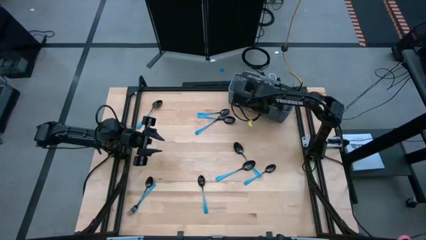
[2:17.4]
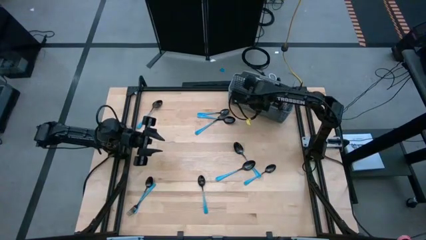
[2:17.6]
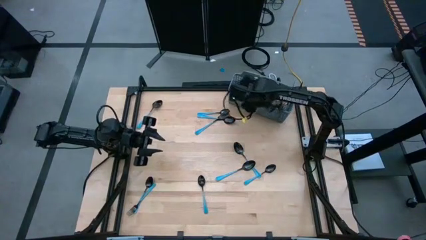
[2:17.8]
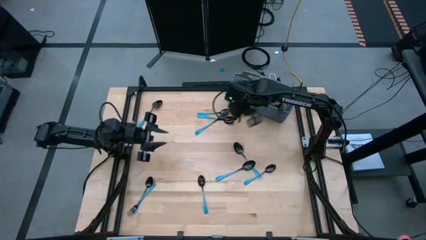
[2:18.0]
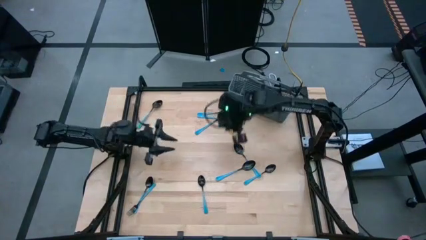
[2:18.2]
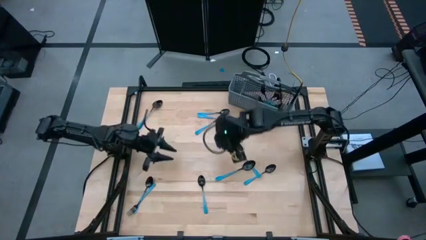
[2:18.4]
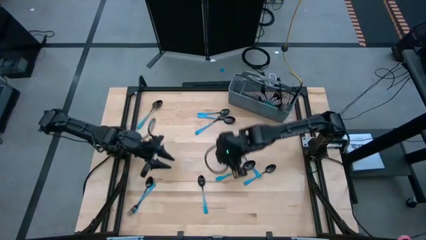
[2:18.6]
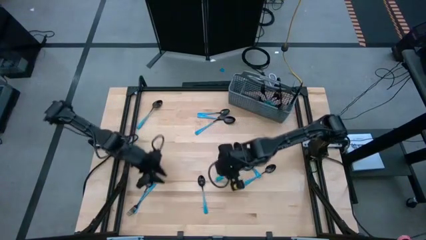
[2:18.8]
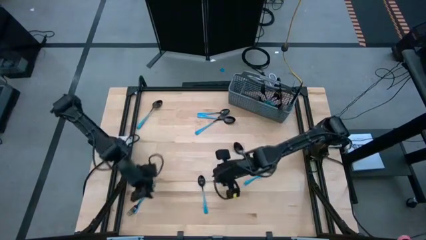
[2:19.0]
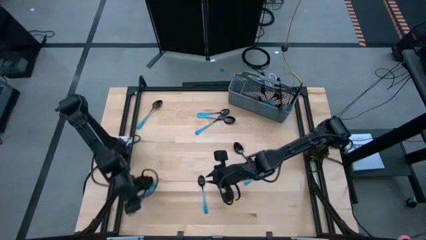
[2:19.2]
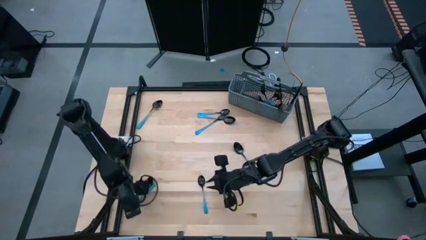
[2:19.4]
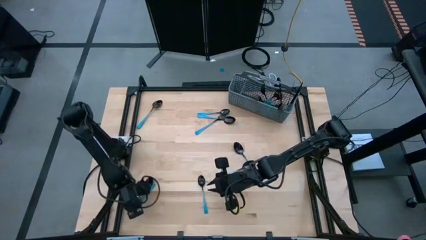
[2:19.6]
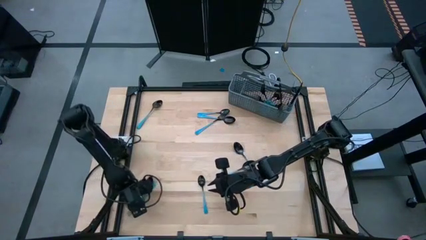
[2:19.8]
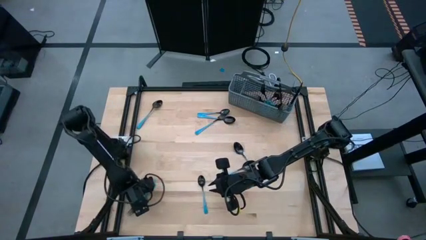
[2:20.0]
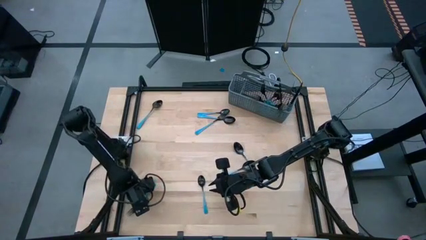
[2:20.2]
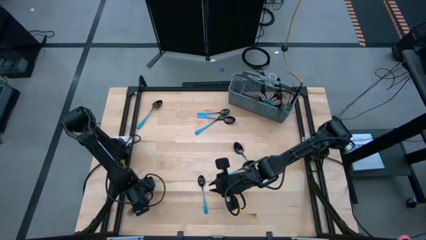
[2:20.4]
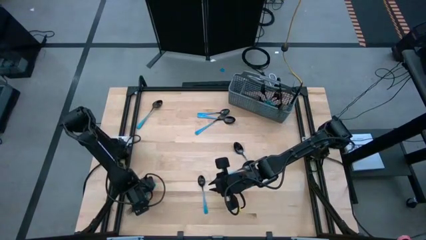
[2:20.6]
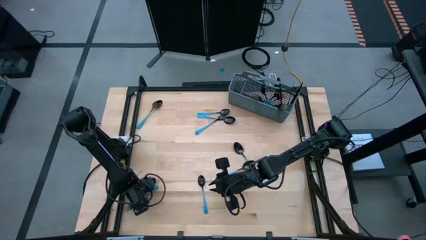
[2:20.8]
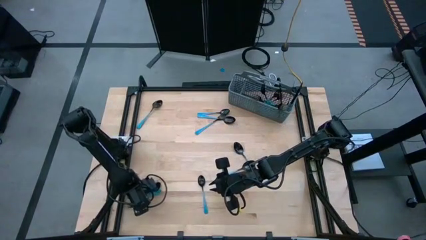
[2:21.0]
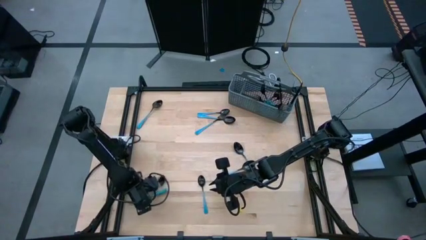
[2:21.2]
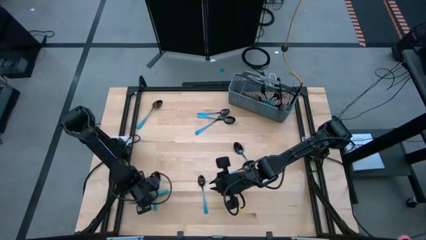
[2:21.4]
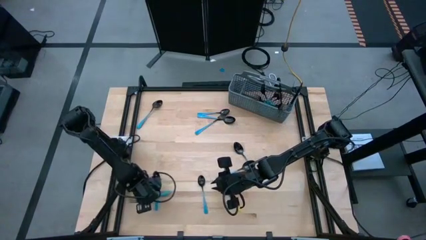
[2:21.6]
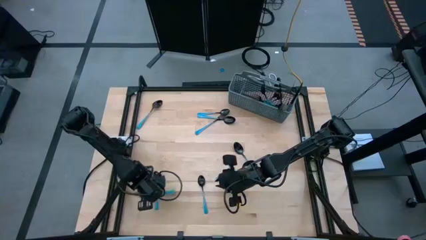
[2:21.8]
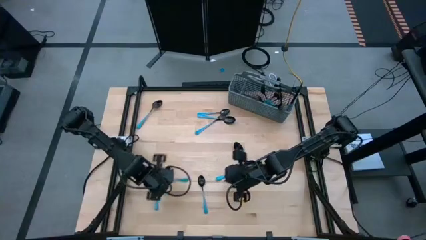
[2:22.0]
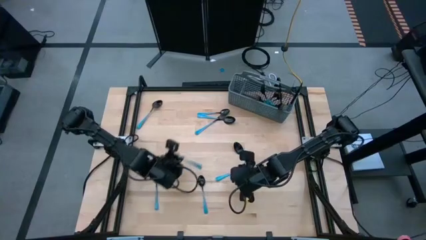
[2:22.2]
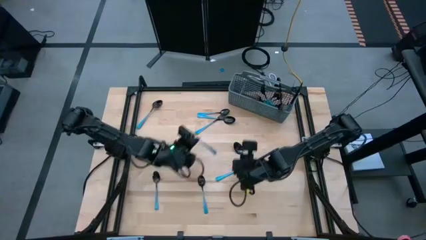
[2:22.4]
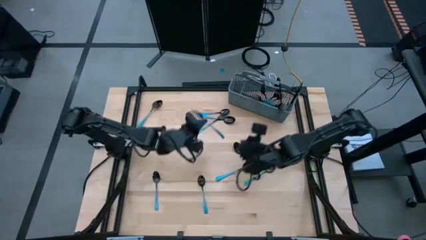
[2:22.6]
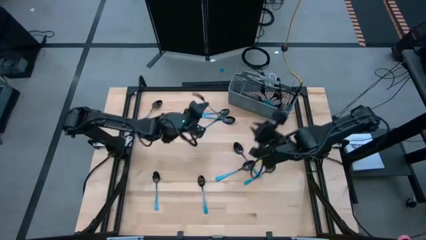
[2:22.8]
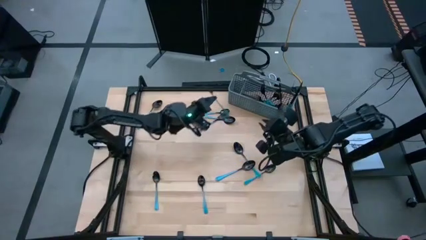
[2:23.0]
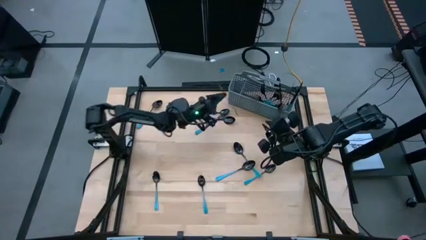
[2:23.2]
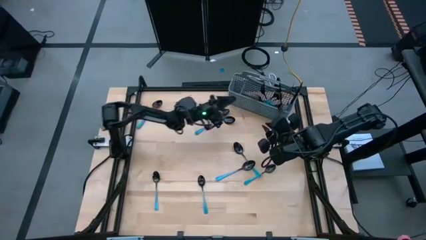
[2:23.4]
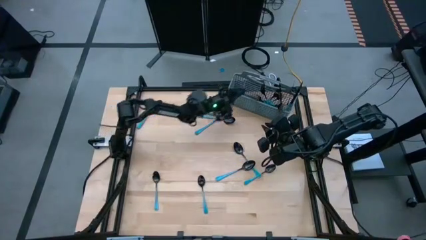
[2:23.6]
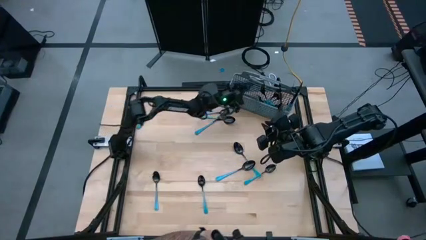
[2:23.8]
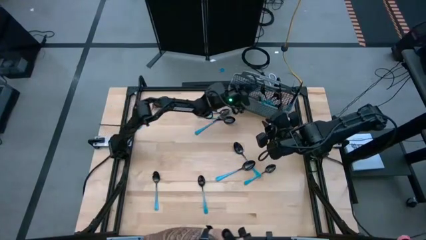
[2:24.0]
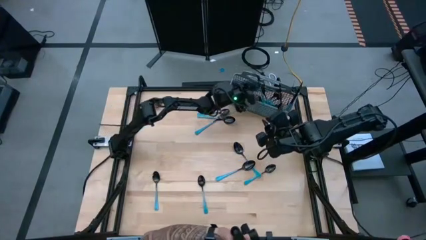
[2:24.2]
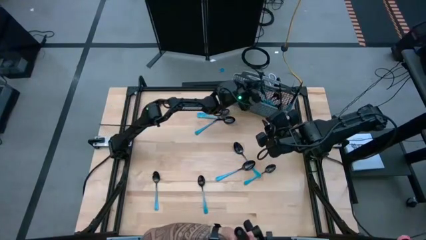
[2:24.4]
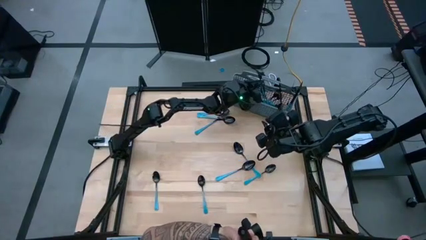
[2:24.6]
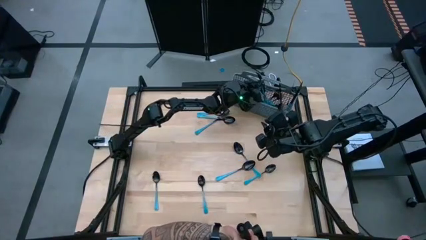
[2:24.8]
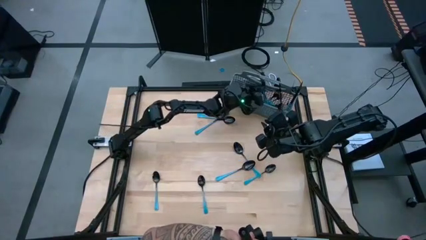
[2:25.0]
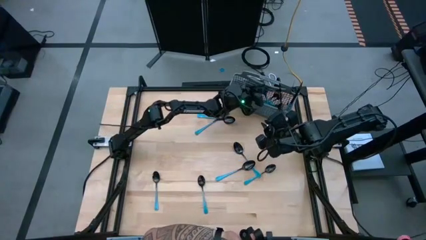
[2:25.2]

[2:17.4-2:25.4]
Task: Sort silverware
Put the blue fork into the middle of the blue utensil organizer

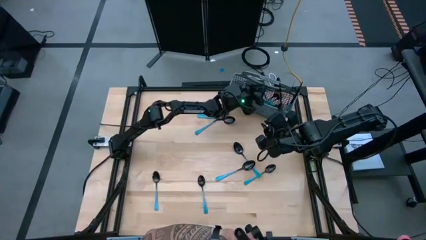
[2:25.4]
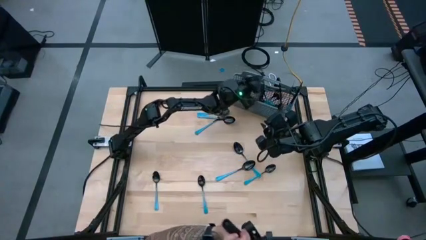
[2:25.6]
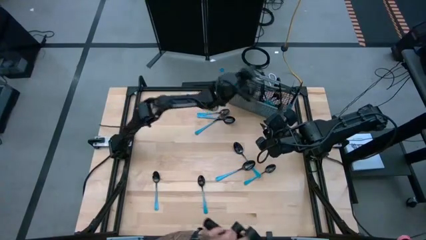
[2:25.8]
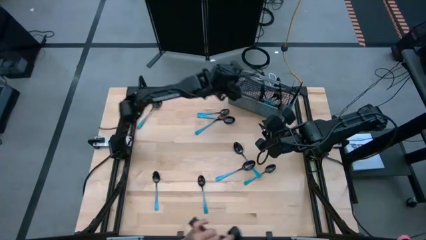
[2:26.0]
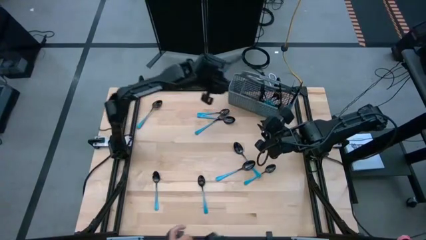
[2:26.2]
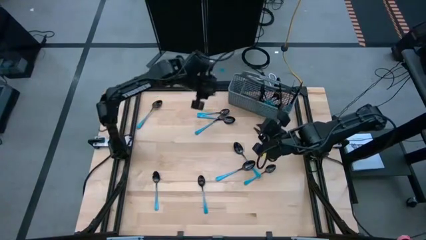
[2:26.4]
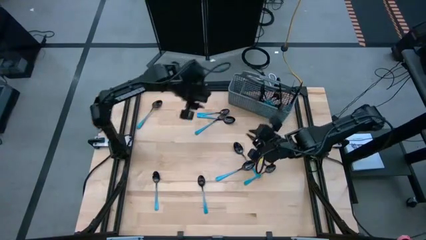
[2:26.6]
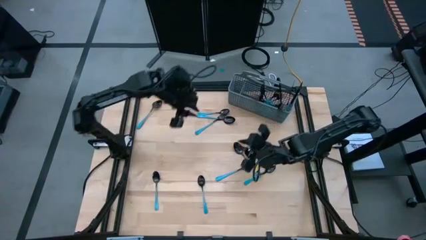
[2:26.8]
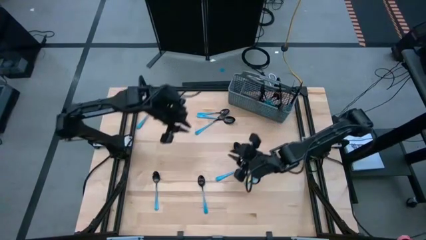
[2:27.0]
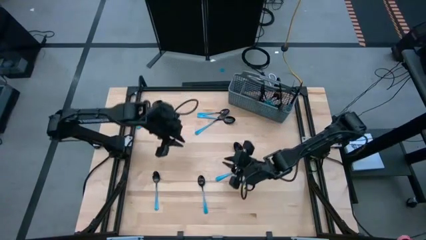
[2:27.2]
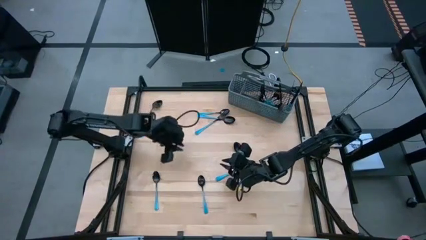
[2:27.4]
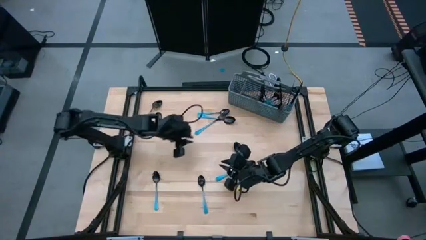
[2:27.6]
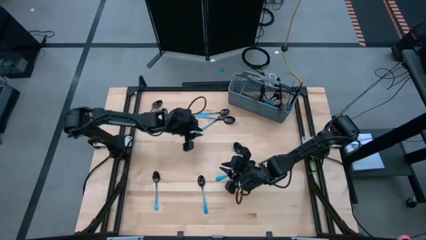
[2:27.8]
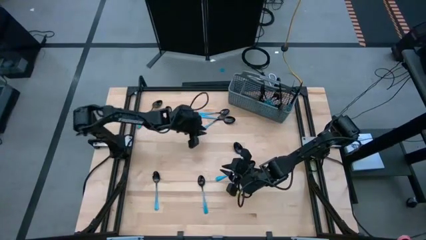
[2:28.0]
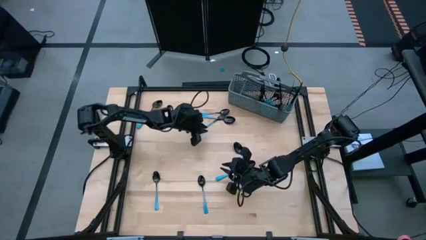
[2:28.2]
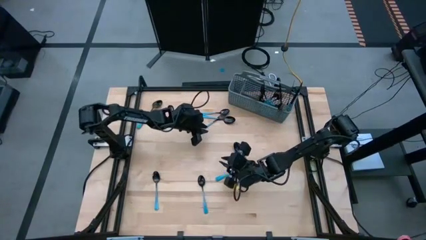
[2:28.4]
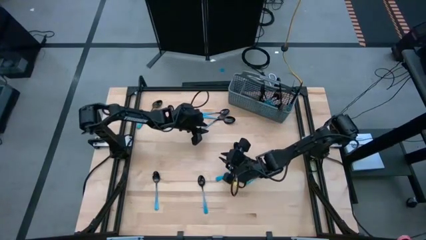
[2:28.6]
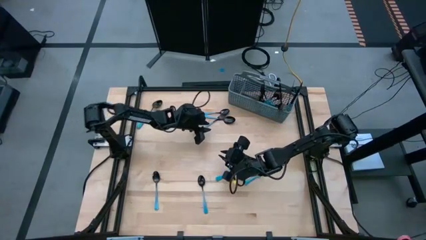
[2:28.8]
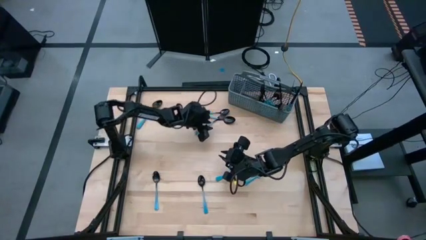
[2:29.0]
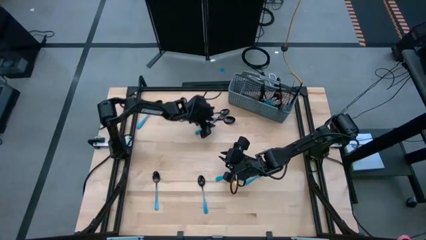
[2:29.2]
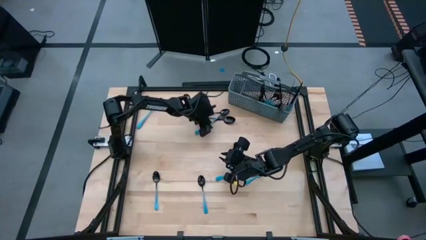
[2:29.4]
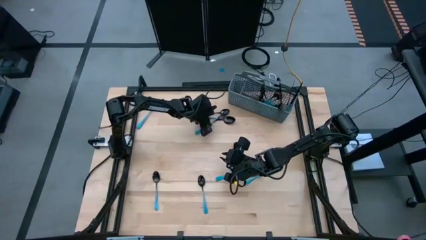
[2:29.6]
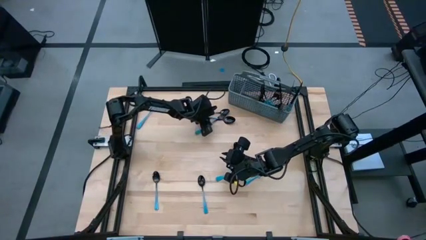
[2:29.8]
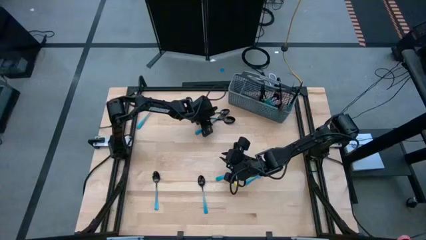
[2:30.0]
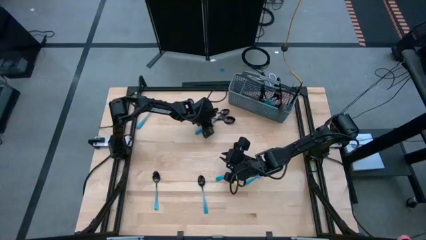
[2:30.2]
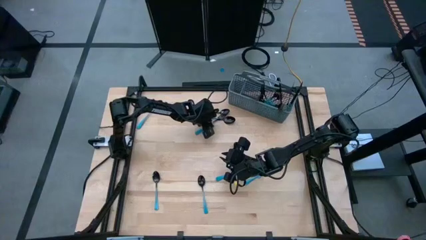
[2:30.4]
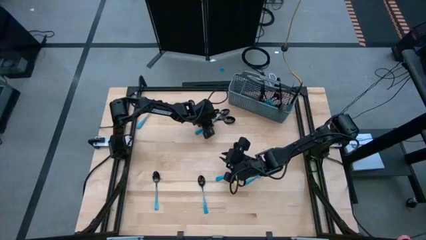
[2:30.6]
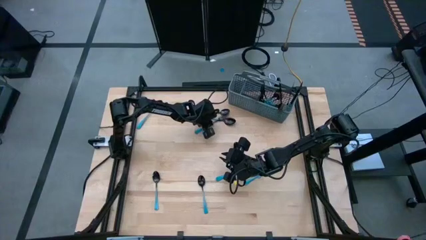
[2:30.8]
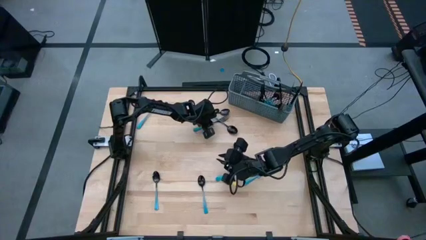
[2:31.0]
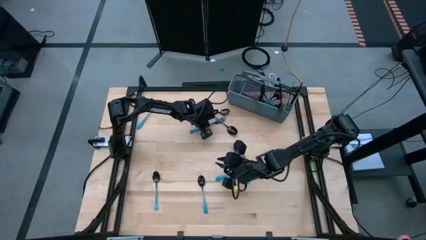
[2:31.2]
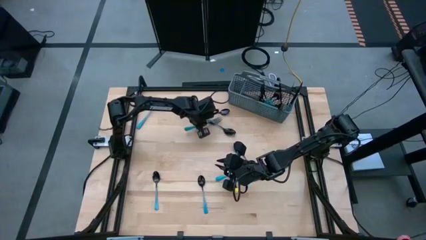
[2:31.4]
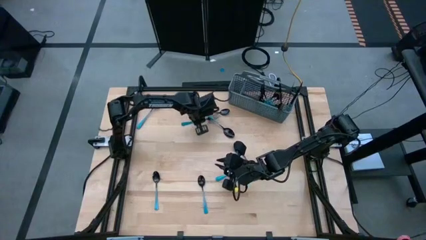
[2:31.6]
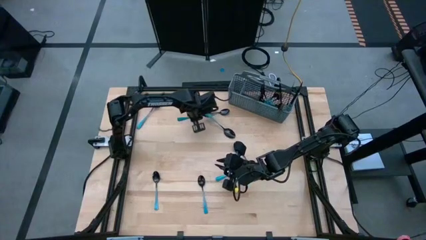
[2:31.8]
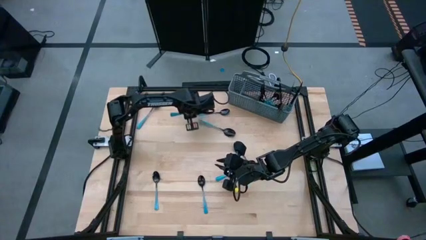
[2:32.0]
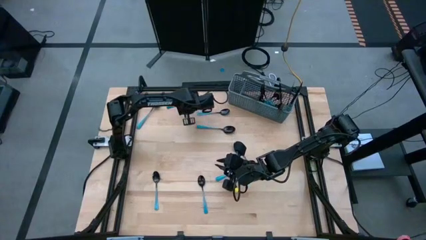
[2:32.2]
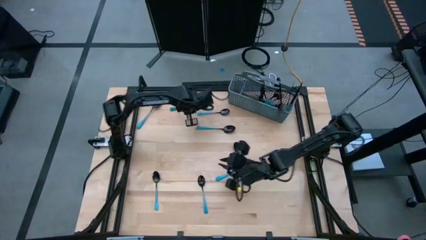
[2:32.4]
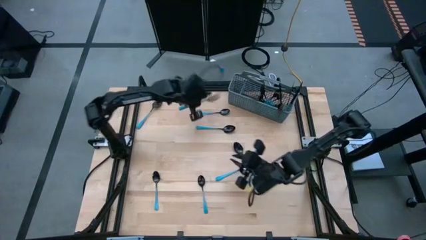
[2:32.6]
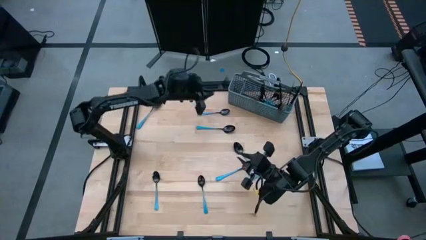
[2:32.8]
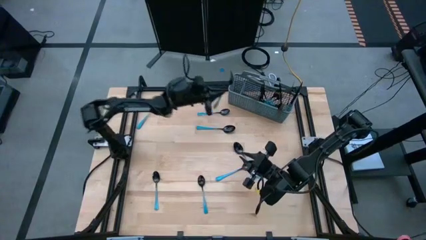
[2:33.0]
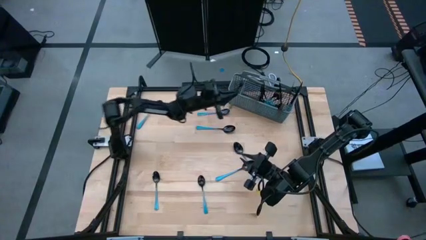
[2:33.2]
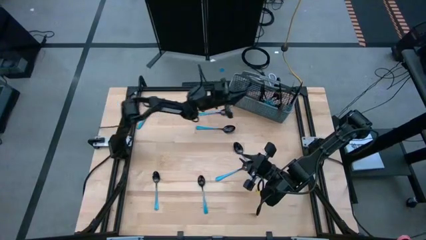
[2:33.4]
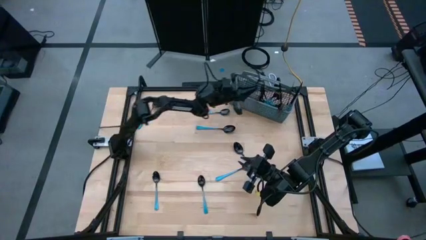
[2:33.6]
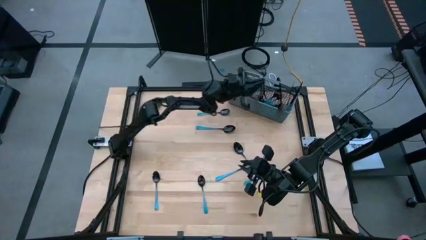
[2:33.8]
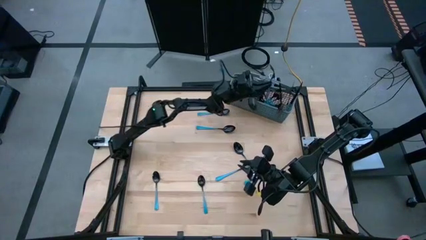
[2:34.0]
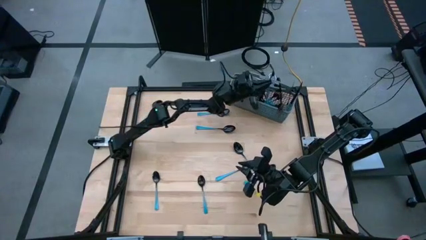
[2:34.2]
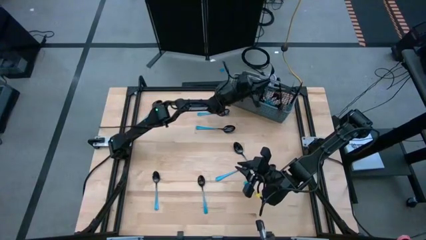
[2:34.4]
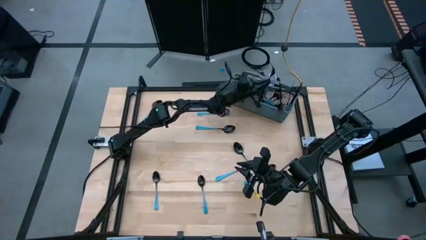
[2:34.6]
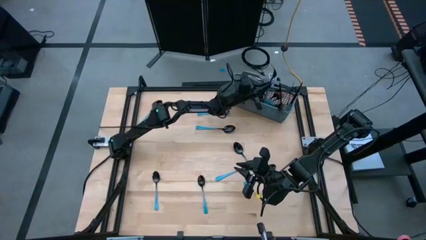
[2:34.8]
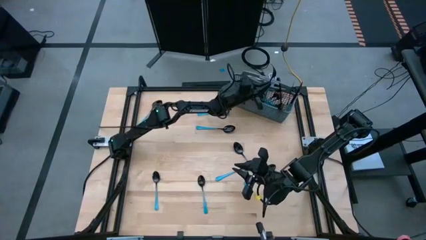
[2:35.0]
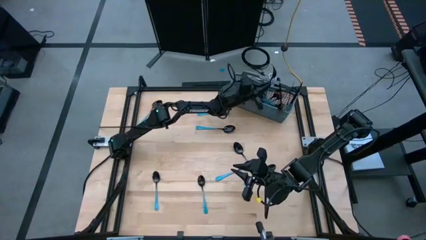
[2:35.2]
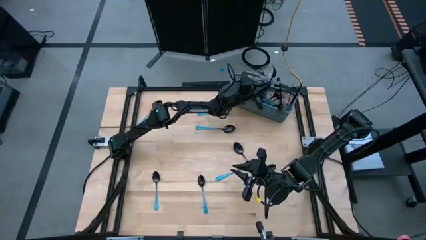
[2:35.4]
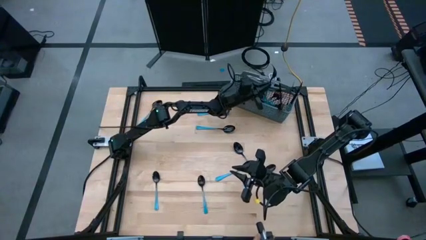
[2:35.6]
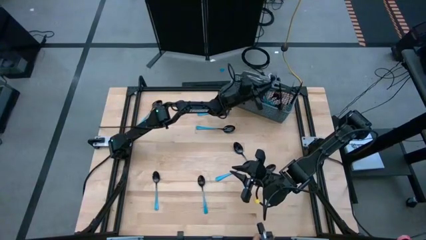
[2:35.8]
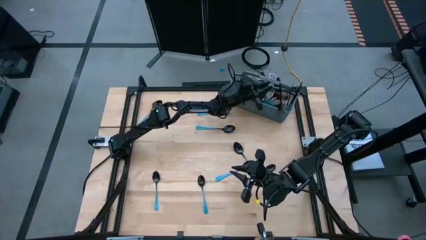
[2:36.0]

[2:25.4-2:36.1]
Put the blue fork into the middle of the blue utensil organizer
